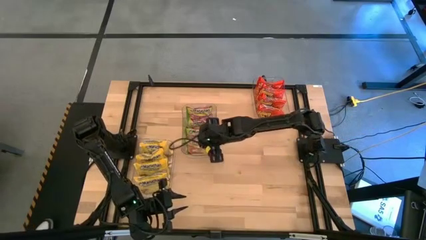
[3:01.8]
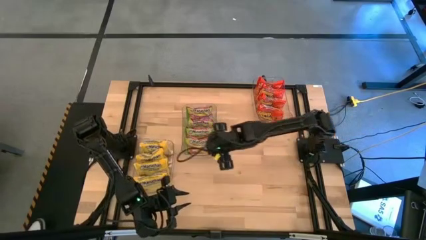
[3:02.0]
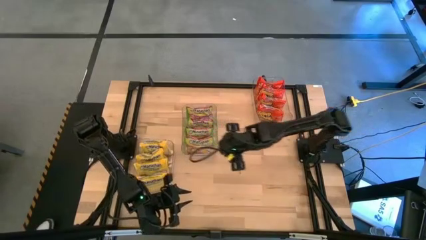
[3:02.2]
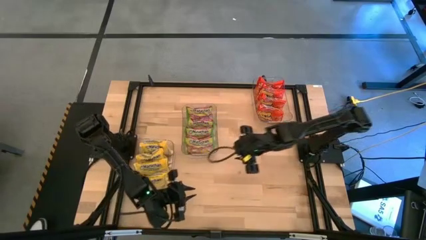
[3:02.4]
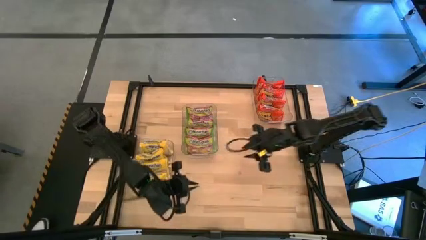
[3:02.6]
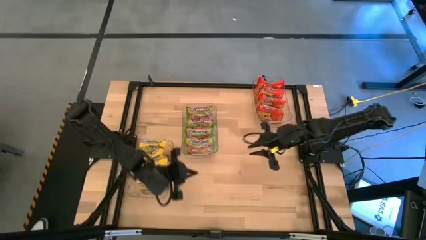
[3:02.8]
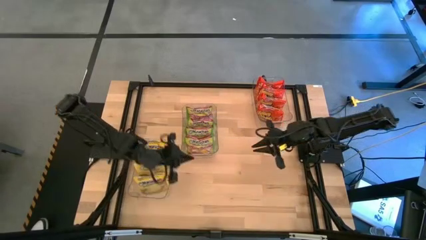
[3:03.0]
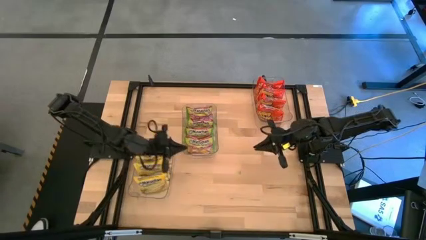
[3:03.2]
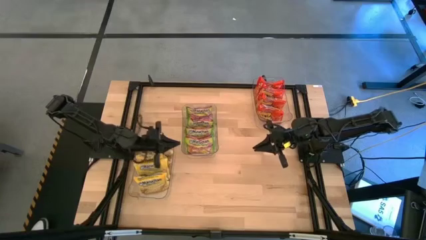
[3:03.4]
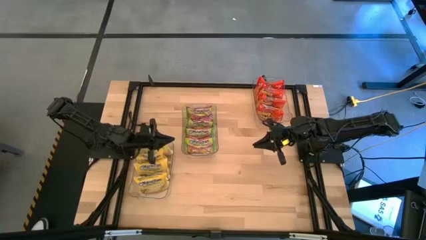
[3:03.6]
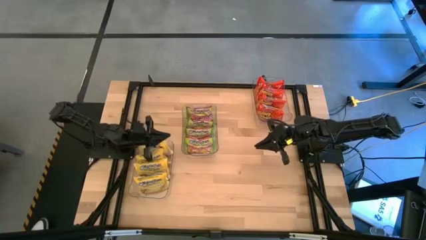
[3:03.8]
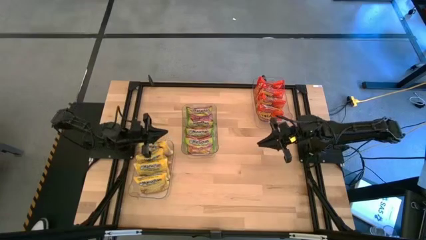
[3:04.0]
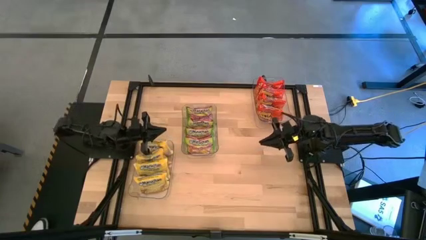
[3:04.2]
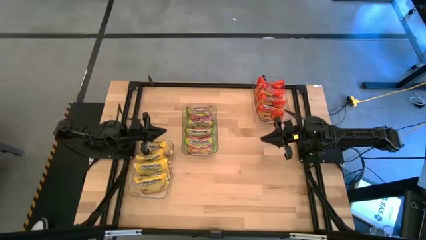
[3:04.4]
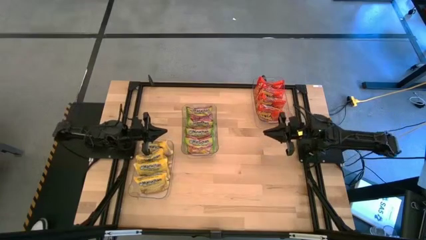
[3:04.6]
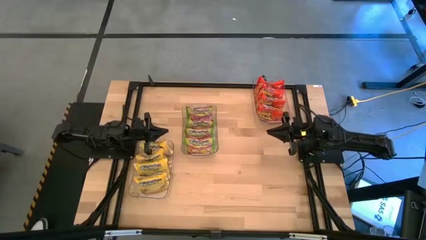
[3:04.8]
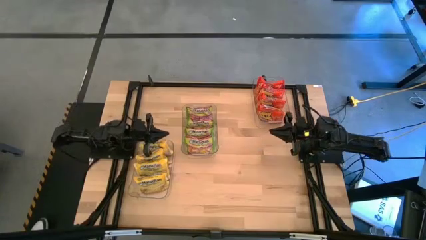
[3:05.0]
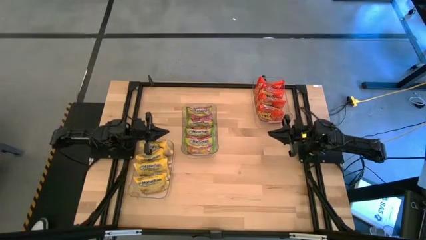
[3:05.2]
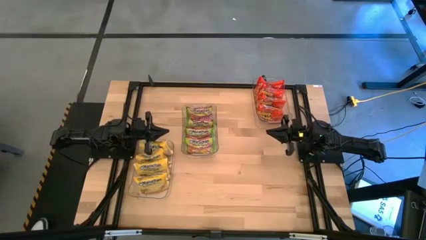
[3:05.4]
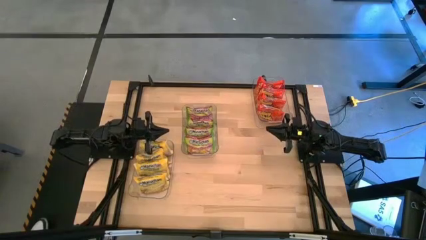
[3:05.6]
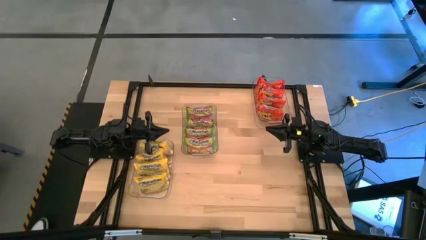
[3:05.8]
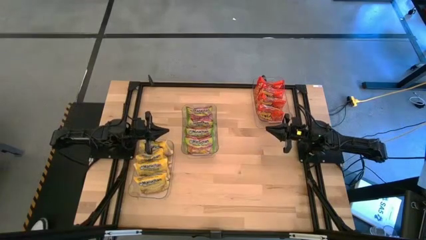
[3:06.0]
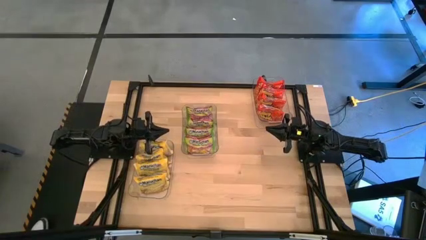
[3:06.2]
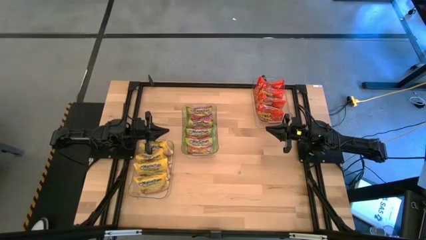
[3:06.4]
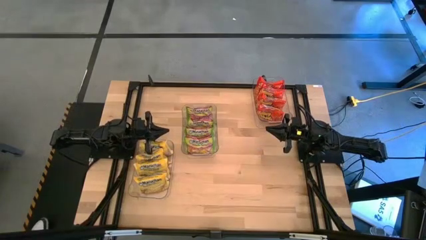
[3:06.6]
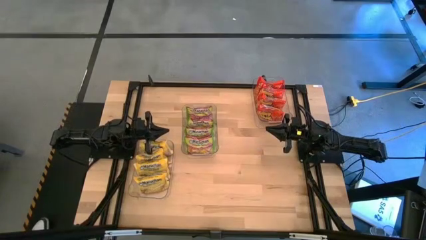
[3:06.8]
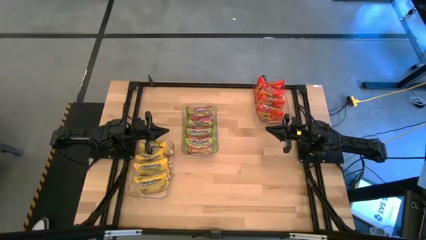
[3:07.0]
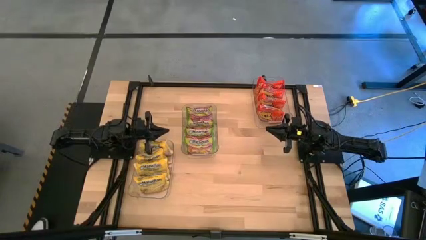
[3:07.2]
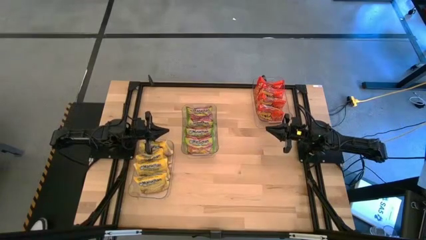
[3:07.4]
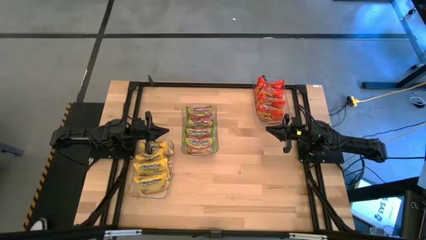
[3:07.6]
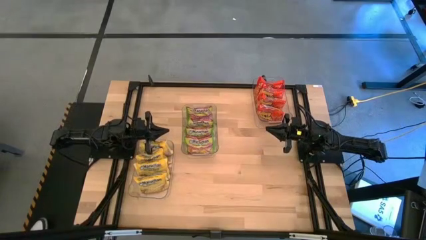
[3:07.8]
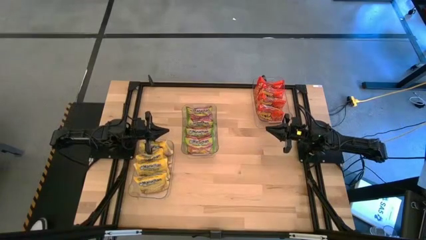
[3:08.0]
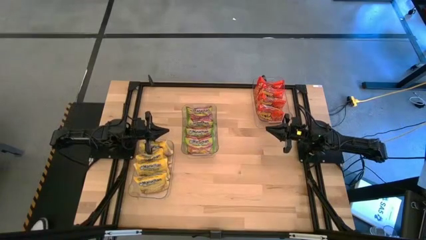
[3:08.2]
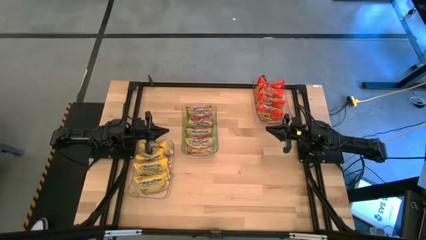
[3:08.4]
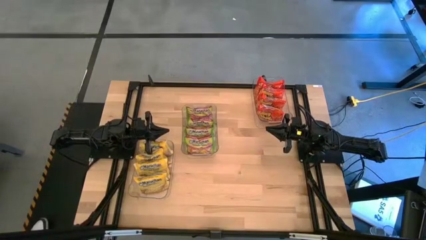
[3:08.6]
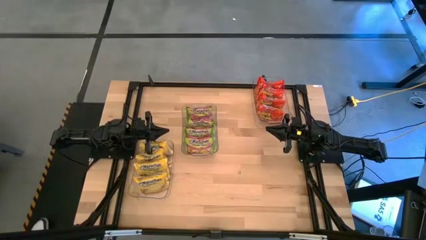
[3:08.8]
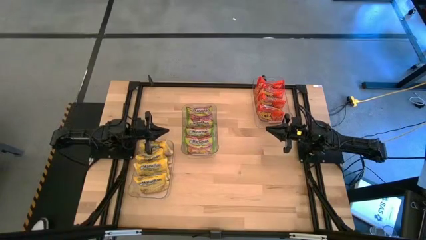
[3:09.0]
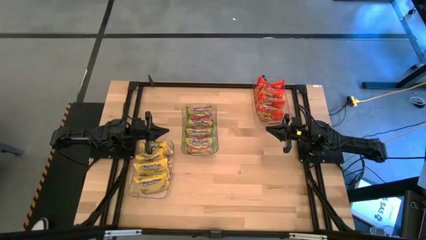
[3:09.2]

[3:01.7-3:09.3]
Task: Sort Maruchan noodles
Return to Home Position

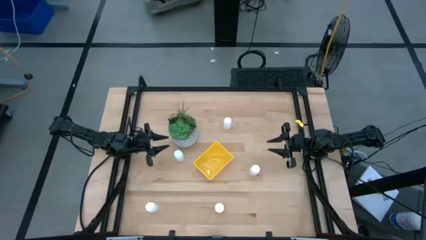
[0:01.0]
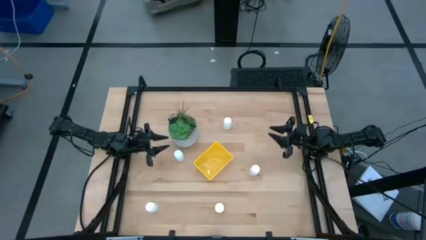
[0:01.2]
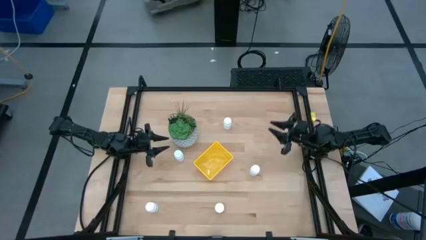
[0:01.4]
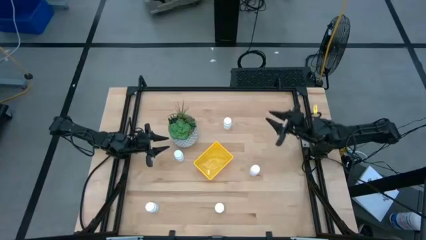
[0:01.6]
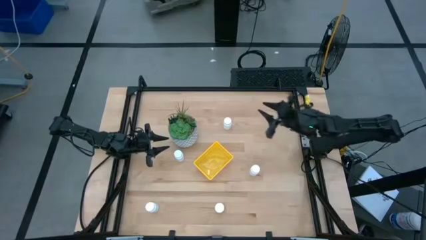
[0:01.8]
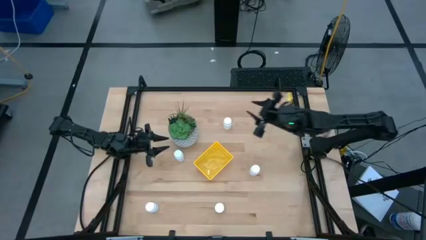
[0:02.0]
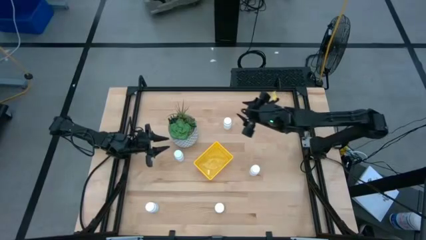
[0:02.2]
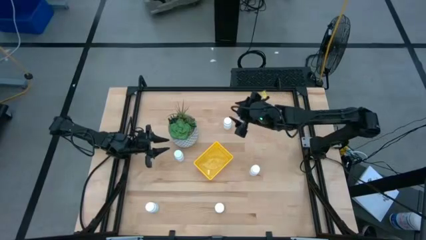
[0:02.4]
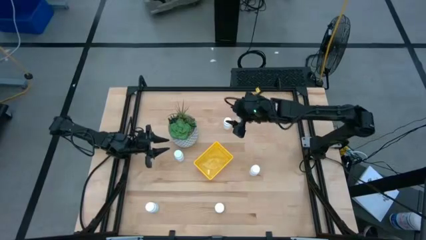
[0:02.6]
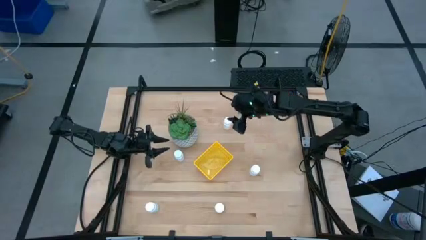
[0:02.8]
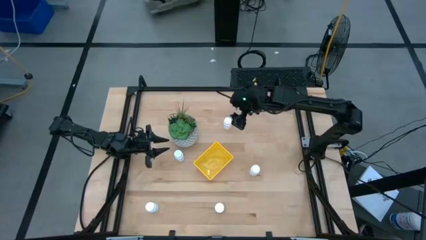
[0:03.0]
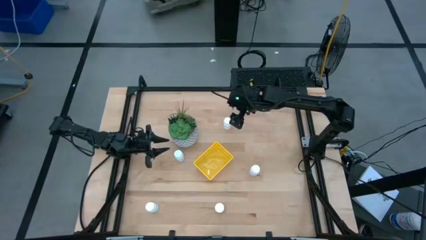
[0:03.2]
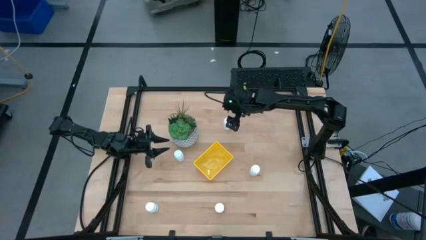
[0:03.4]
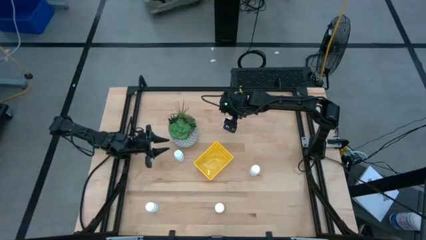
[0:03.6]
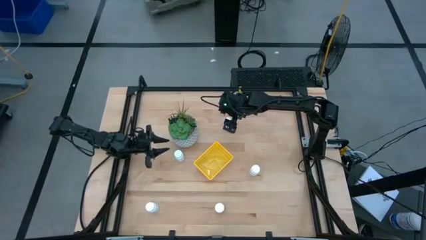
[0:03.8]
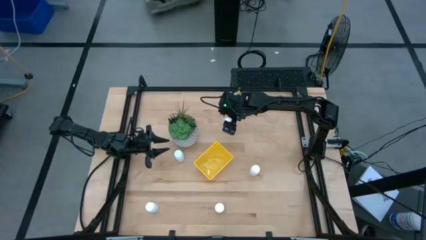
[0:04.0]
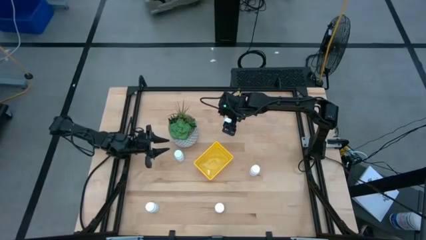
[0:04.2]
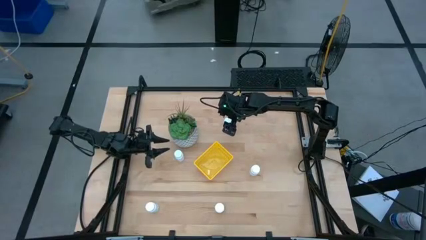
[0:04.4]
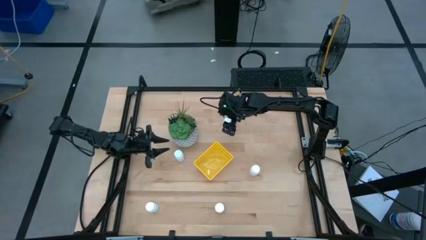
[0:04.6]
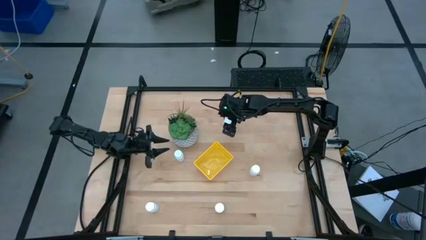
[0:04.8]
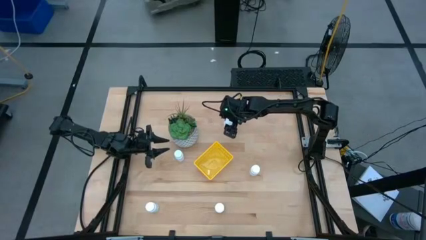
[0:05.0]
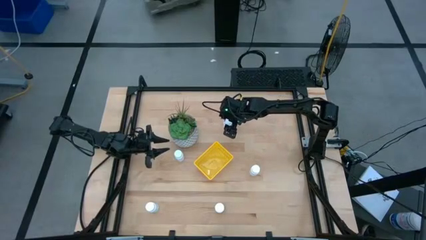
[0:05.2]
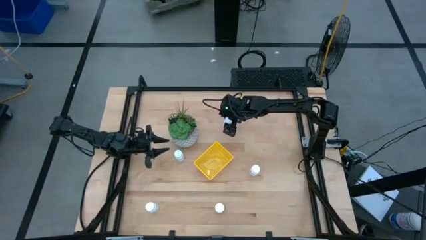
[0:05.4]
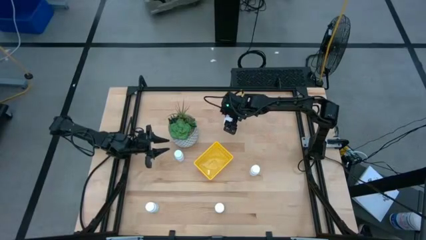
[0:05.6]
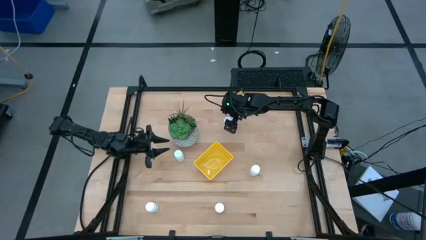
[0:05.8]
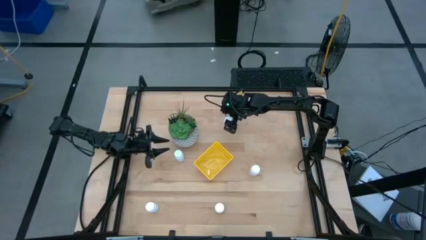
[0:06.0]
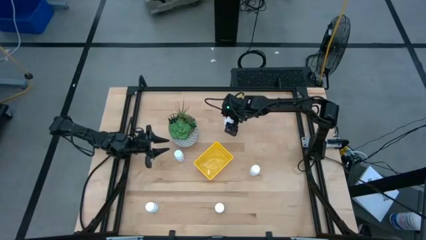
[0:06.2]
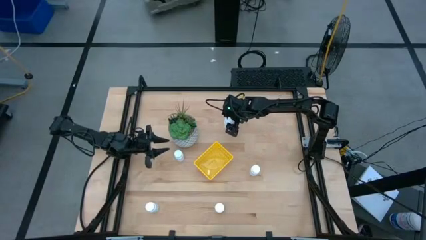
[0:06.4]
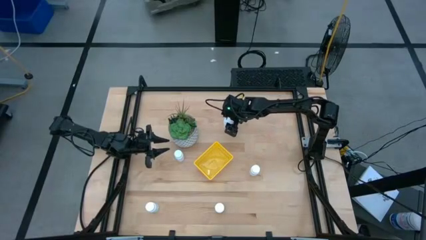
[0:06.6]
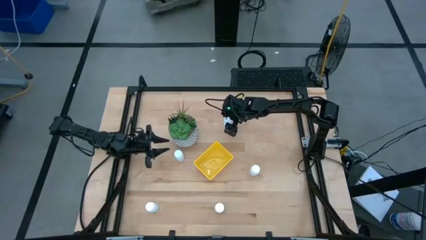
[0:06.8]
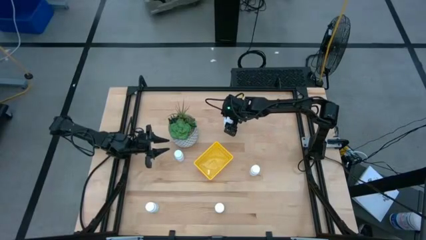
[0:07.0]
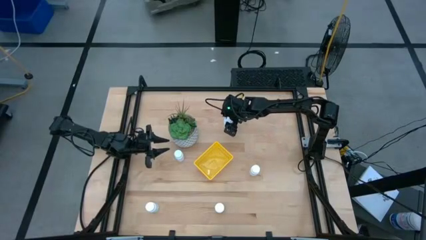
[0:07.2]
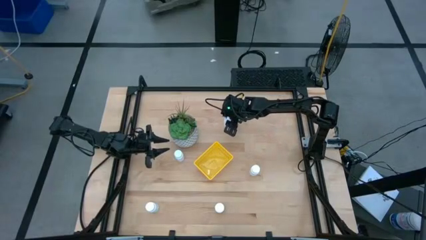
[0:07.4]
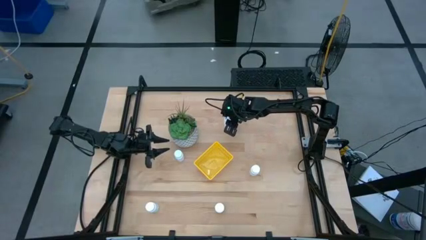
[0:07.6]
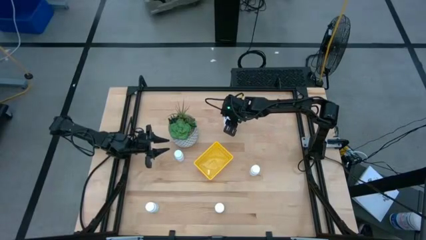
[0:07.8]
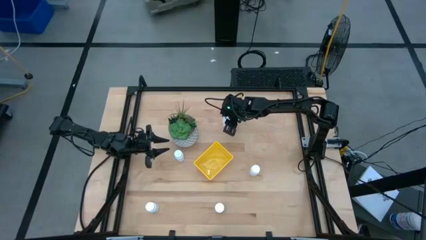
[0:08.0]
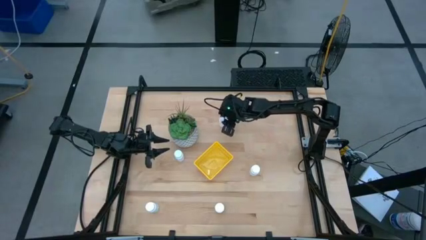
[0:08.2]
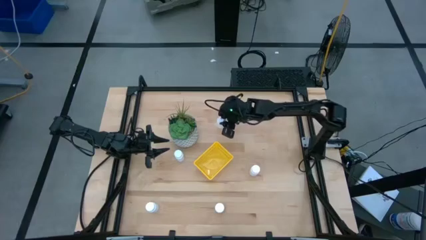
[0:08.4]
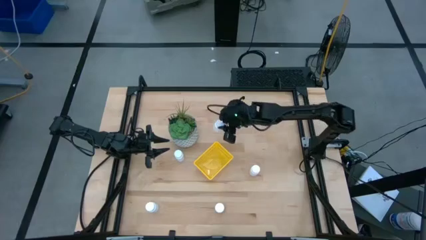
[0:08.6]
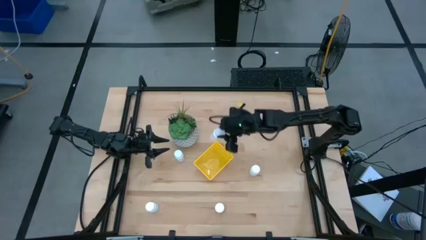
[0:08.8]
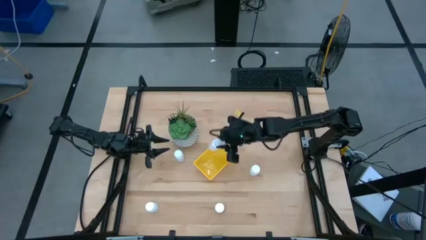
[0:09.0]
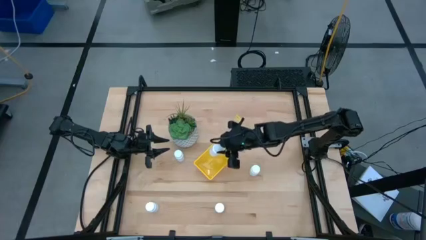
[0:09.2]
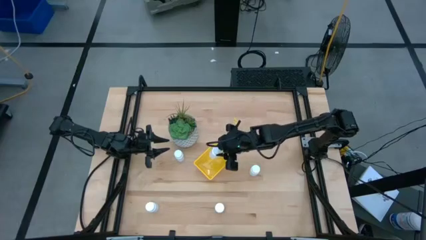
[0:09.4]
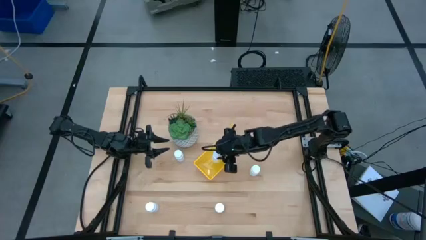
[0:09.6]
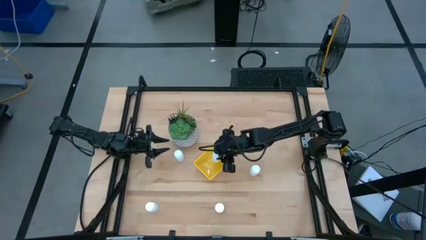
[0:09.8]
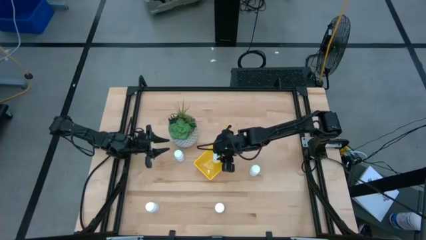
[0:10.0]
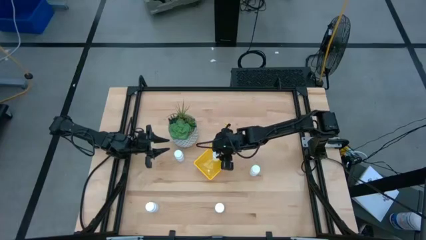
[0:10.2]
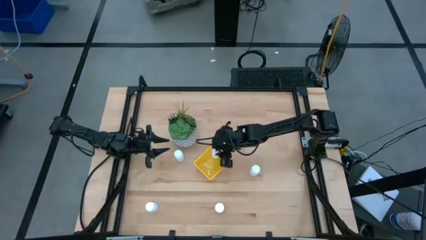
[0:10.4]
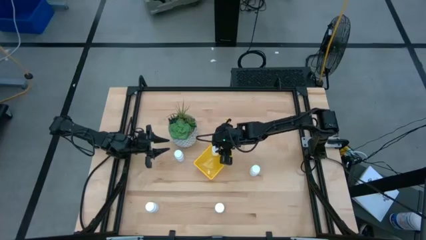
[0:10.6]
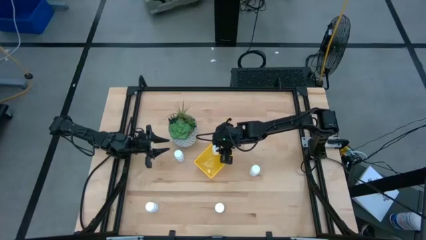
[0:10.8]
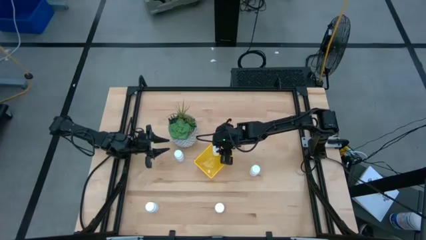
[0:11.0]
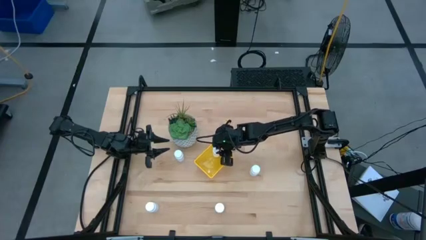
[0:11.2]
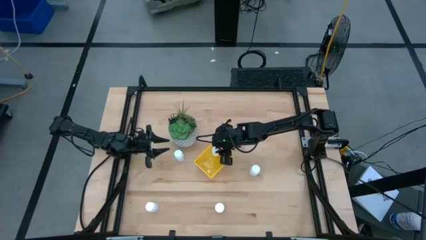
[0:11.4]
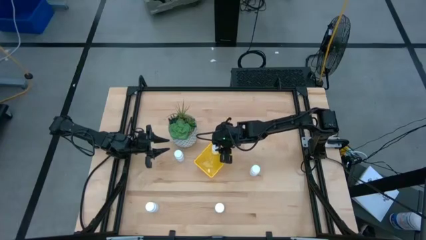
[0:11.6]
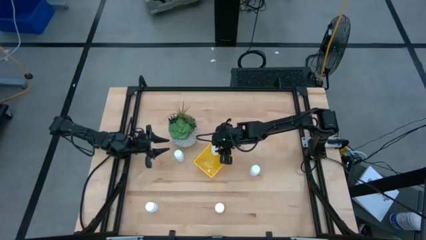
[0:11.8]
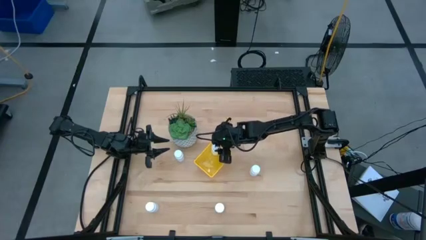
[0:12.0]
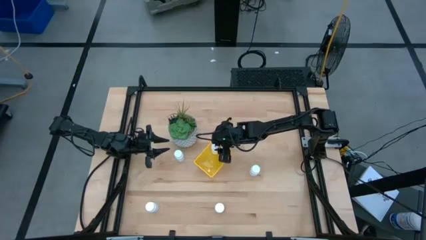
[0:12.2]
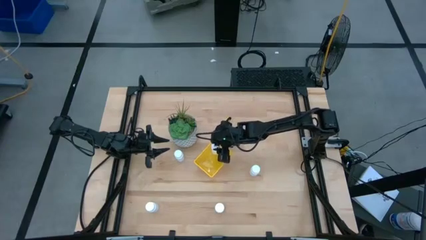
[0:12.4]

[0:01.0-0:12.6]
Task: Pick and place pill bottles into a basket
Put the white pill bottle into the yellow basket
